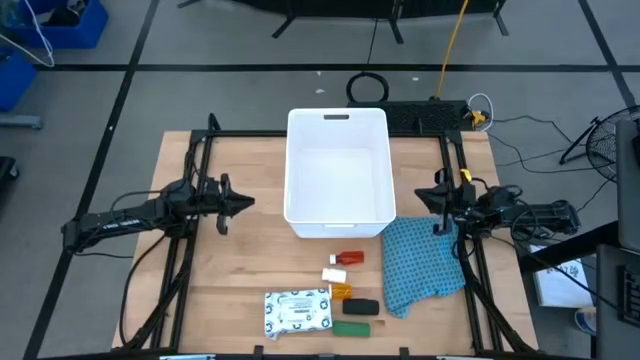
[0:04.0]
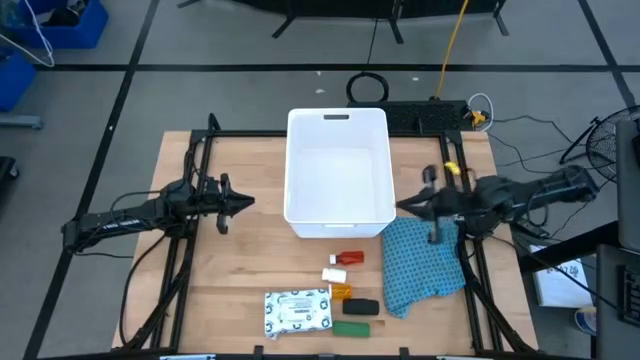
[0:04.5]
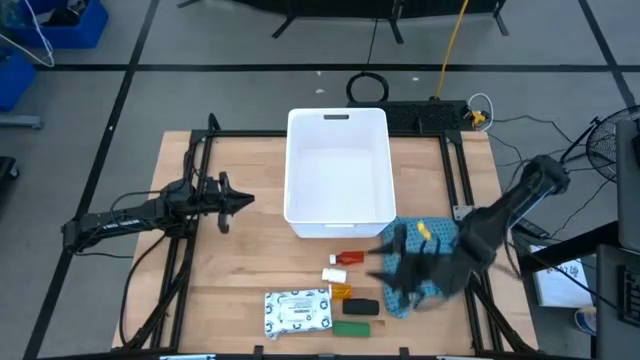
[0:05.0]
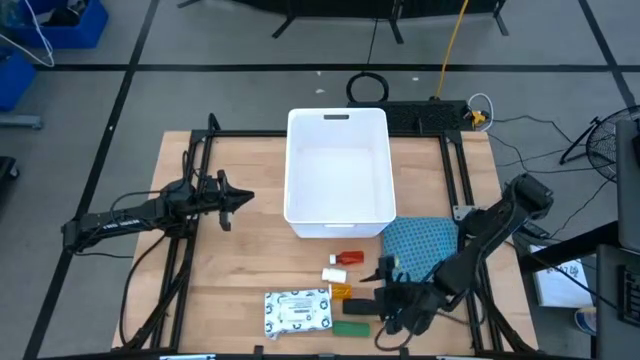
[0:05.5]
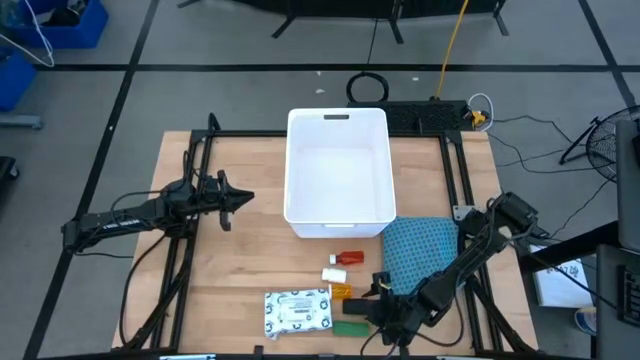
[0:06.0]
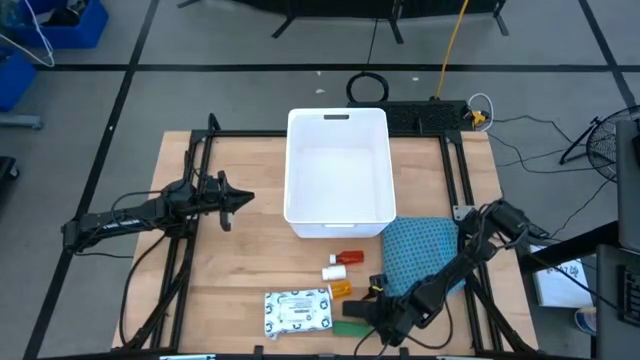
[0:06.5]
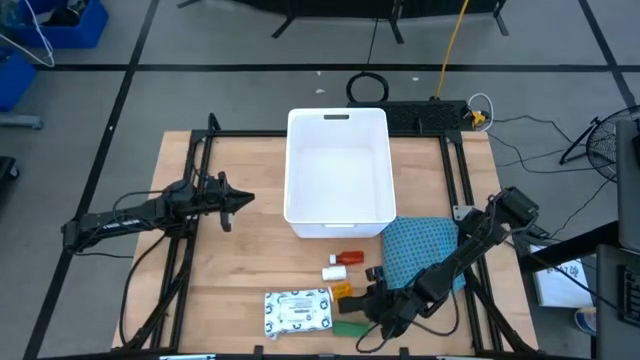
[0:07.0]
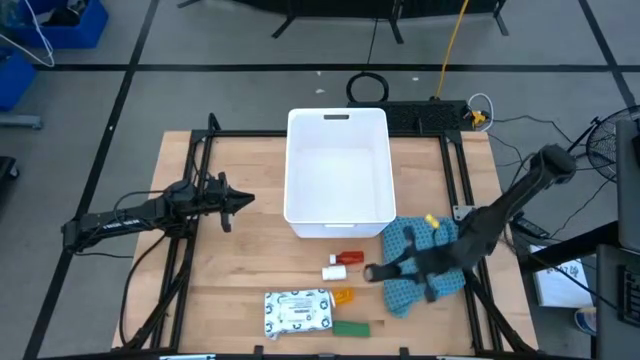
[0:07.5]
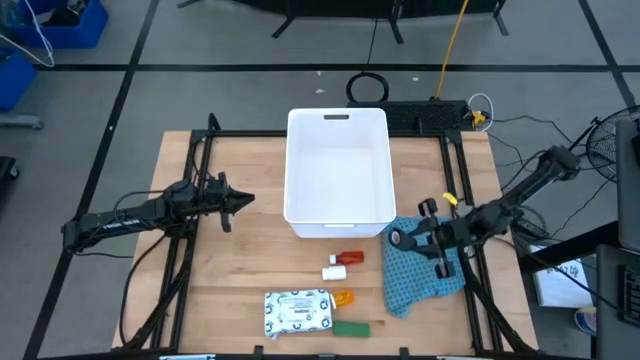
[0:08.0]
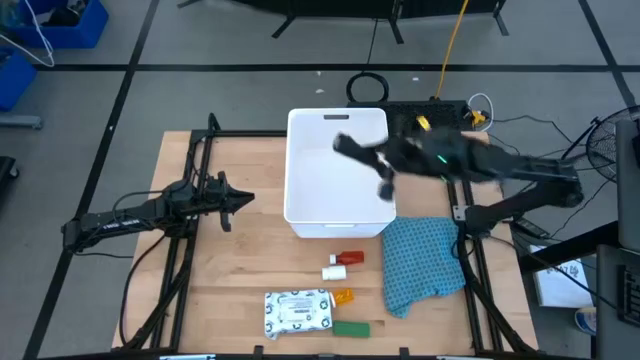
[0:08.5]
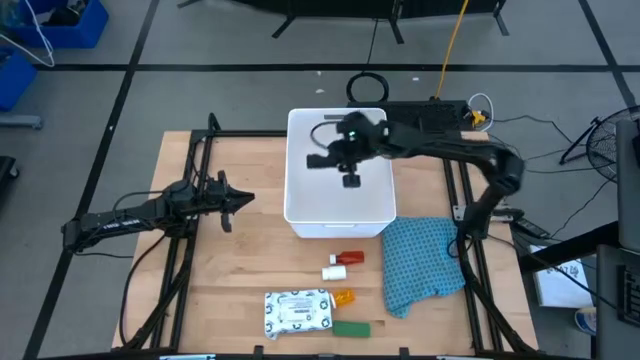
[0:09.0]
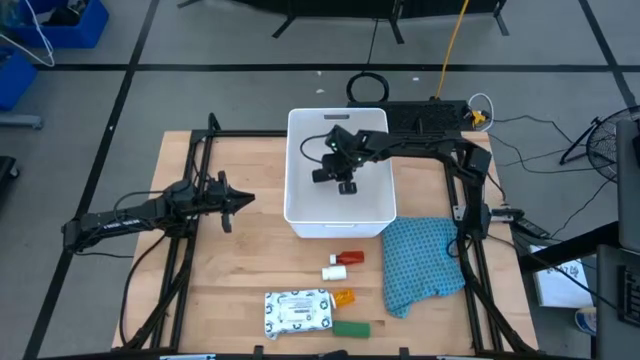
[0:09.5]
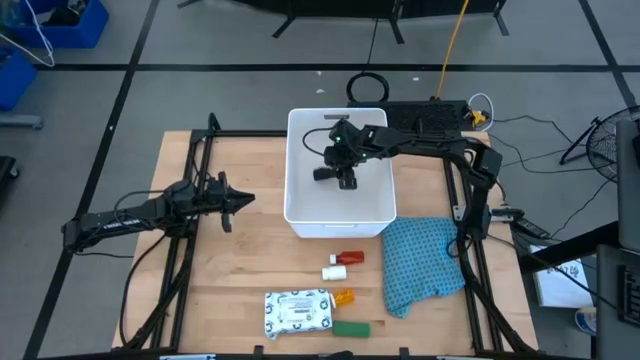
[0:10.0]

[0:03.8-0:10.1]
Task: Pick & place medical supplies in basket/bin
Put the black bandage into the white bin

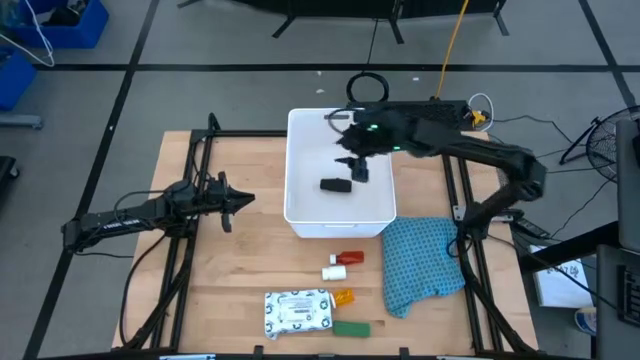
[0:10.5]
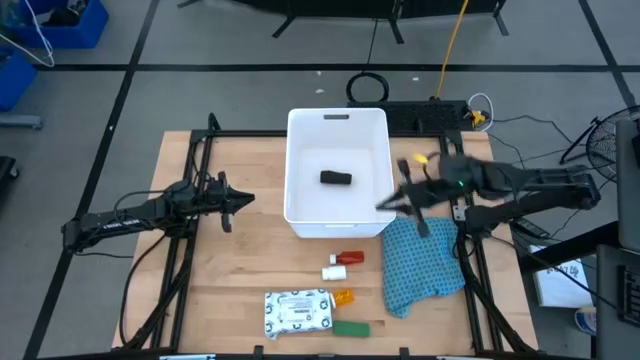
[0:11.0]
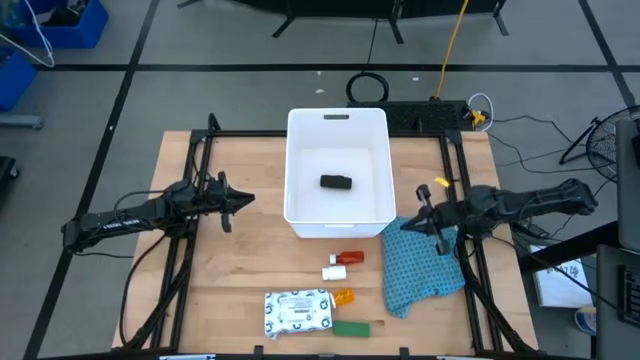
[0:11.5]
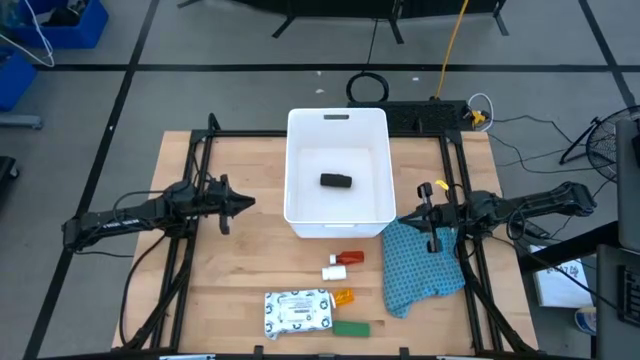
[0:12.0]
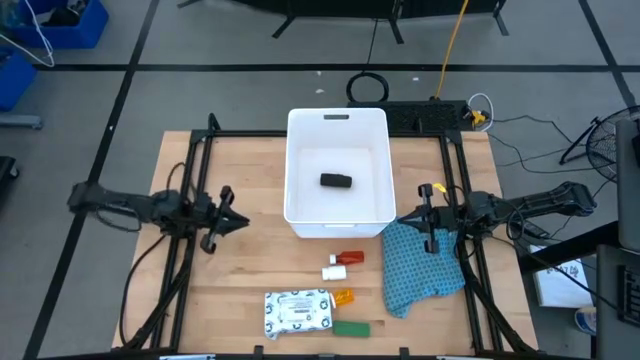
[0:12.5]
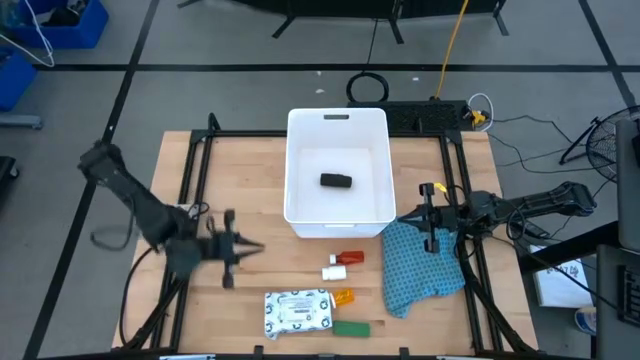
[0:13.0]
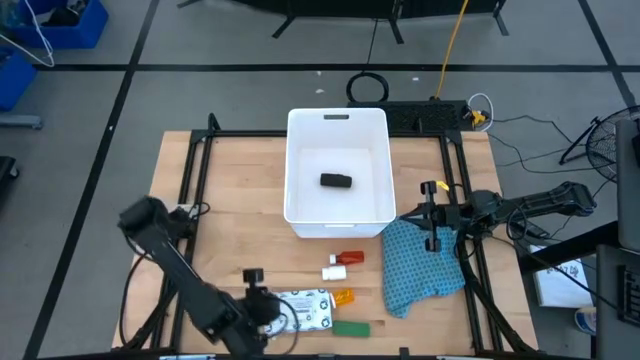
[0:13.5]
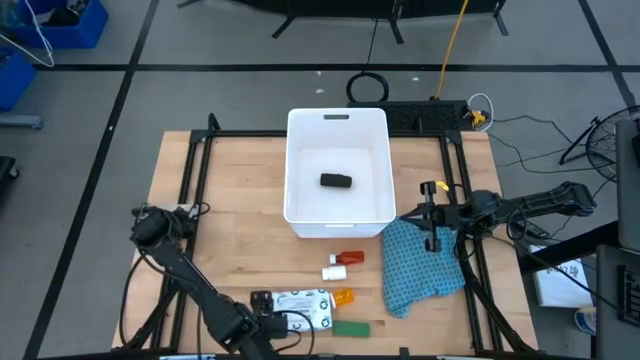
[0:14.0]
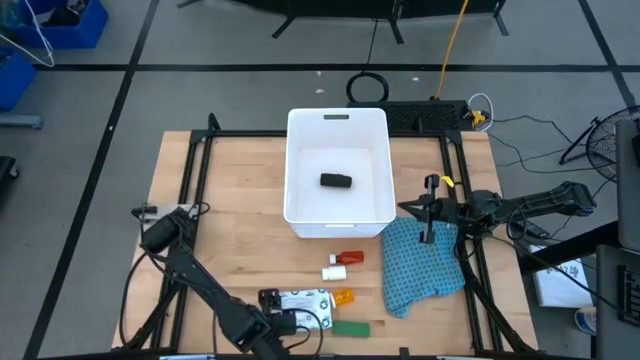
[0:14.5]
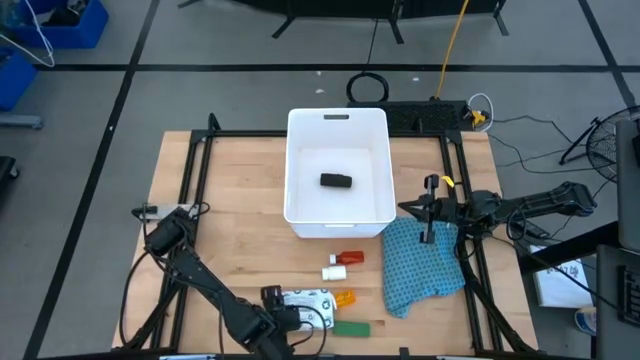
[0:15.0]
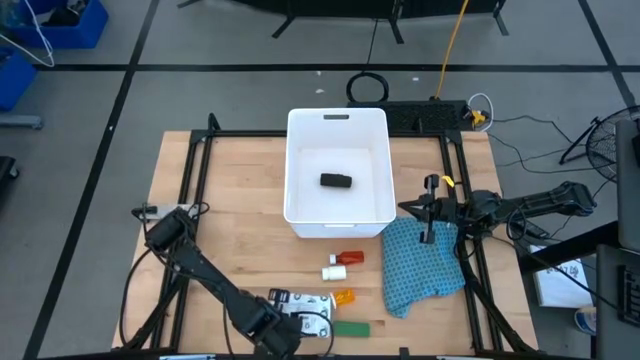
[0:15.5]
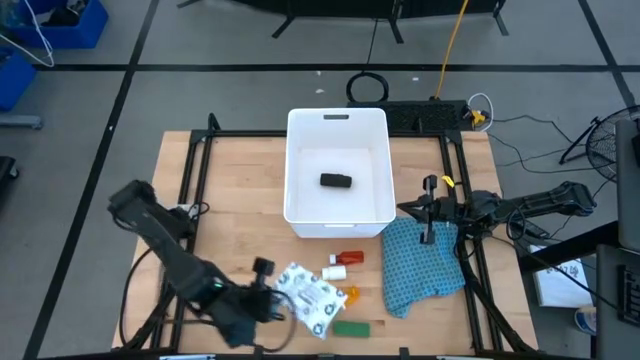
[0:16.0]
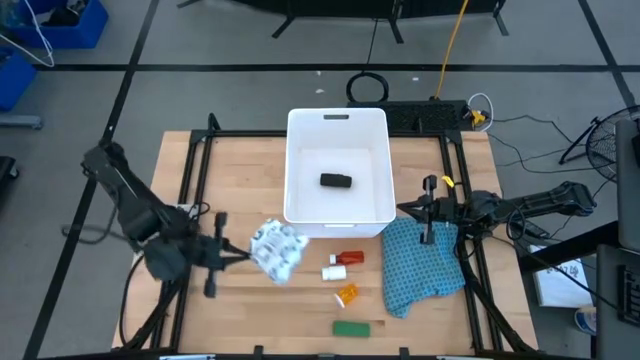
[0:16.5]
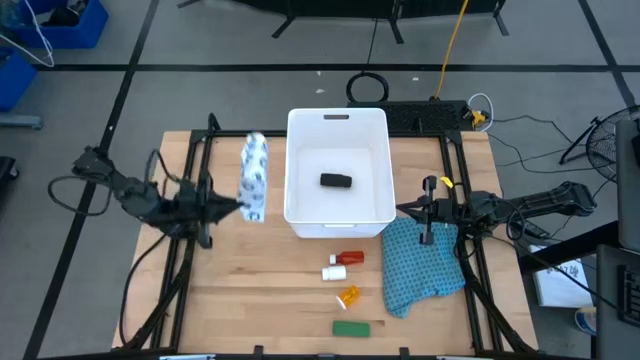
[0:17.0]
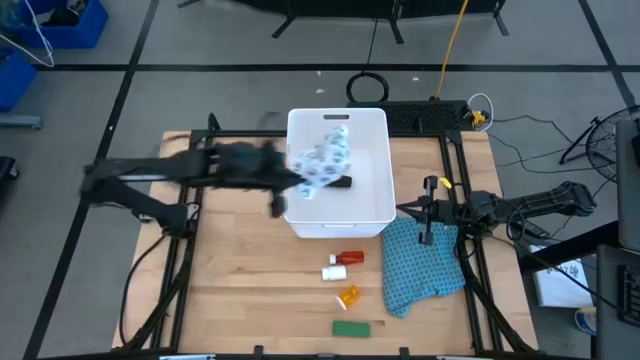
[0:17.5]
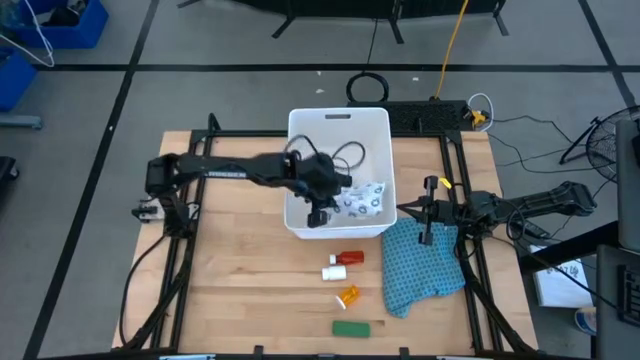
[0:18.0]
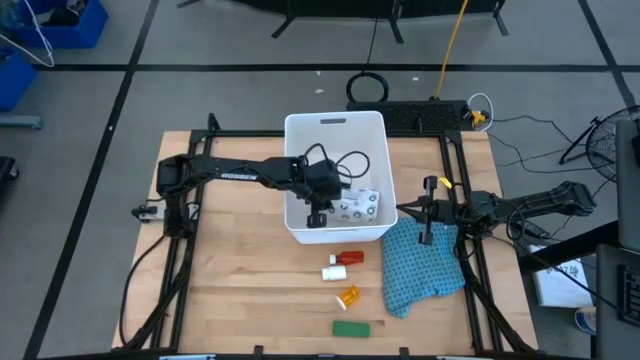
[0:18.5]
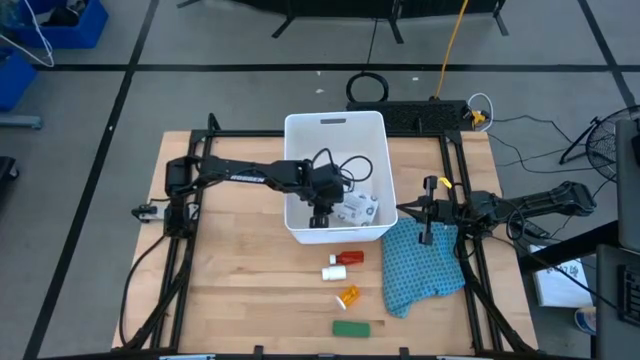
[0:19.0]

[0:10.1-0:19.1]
Put the white wipes into the white bin

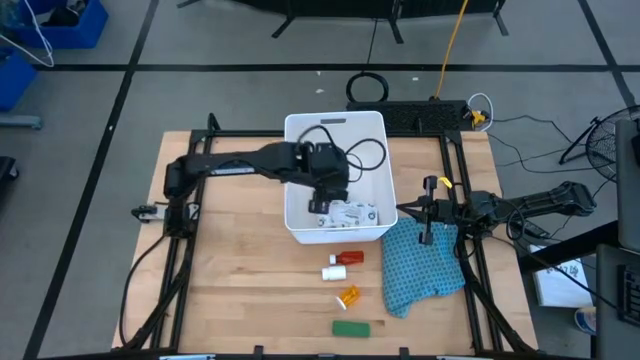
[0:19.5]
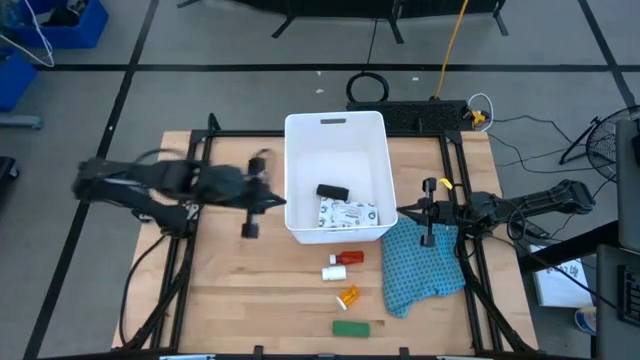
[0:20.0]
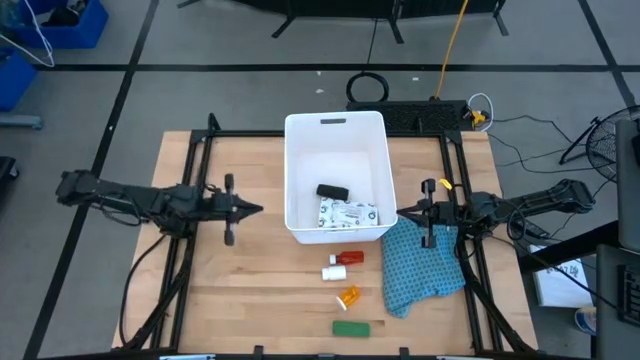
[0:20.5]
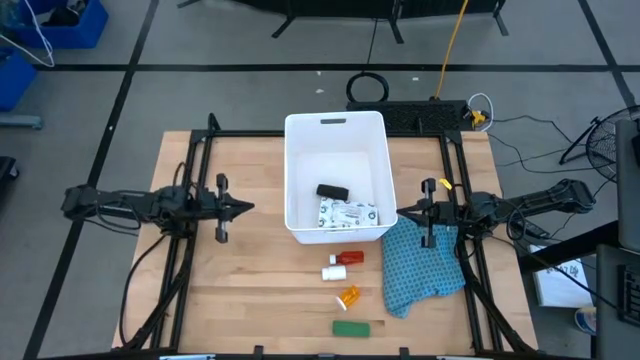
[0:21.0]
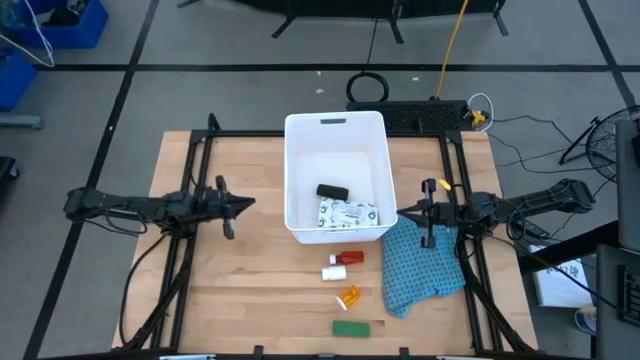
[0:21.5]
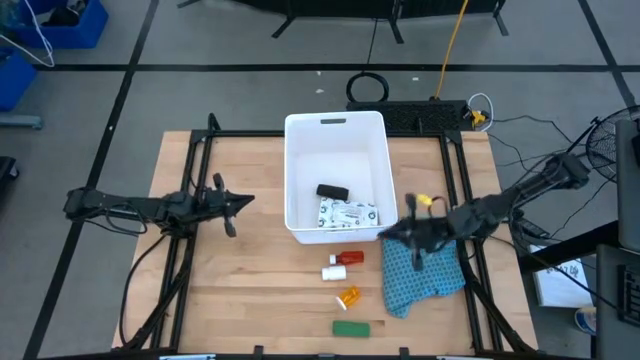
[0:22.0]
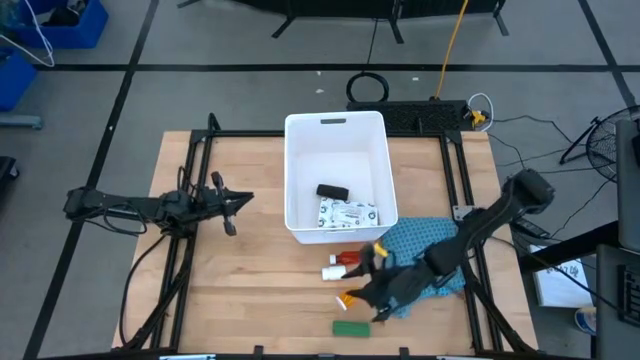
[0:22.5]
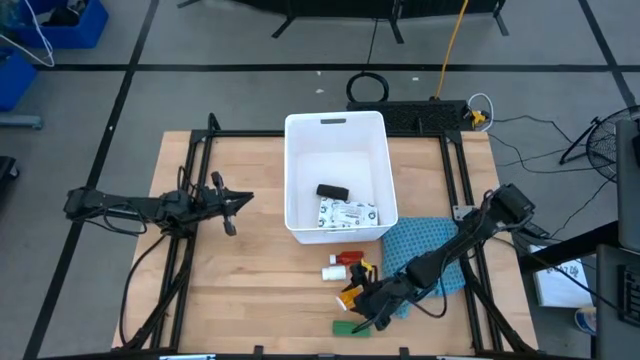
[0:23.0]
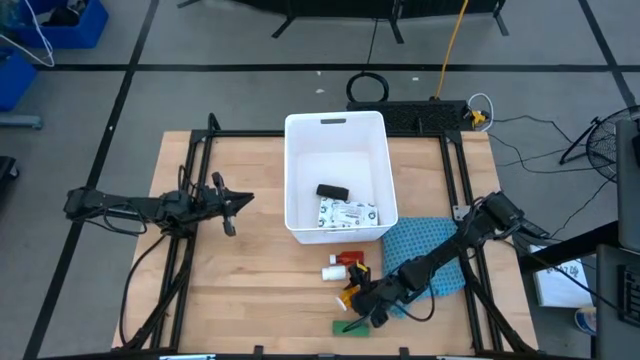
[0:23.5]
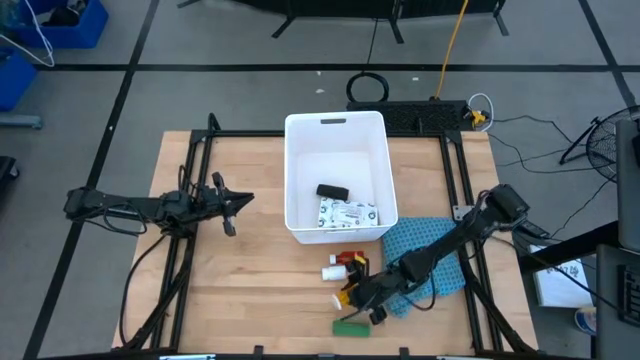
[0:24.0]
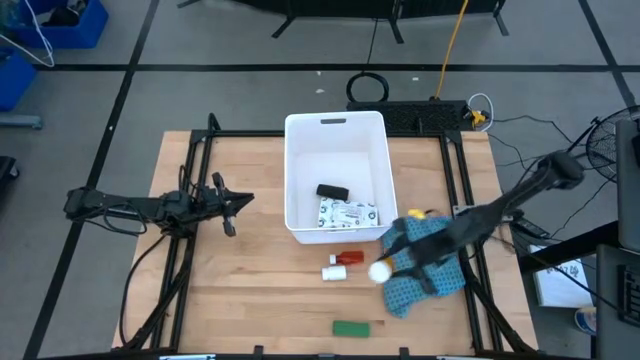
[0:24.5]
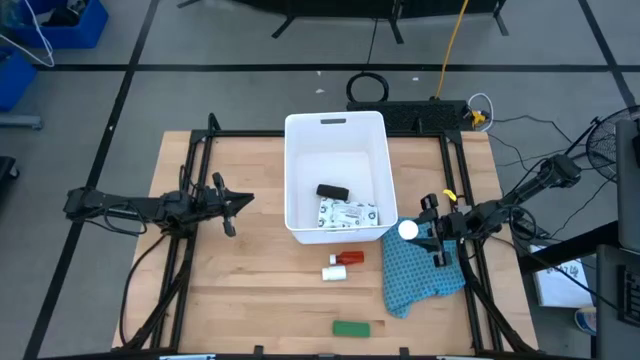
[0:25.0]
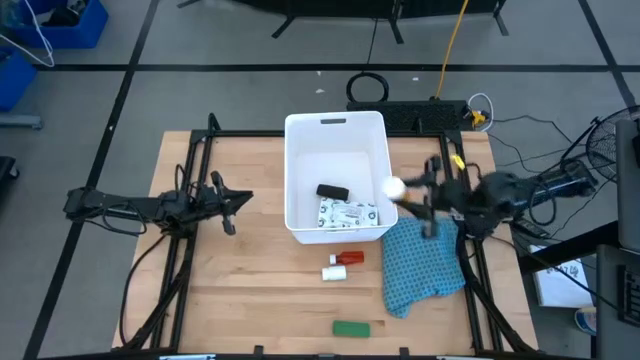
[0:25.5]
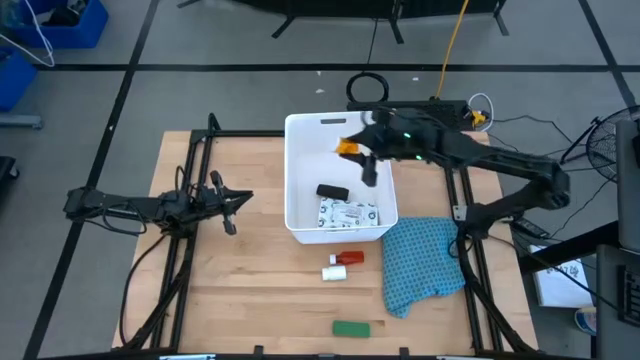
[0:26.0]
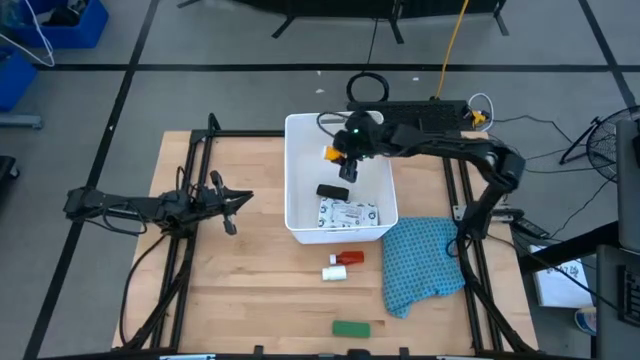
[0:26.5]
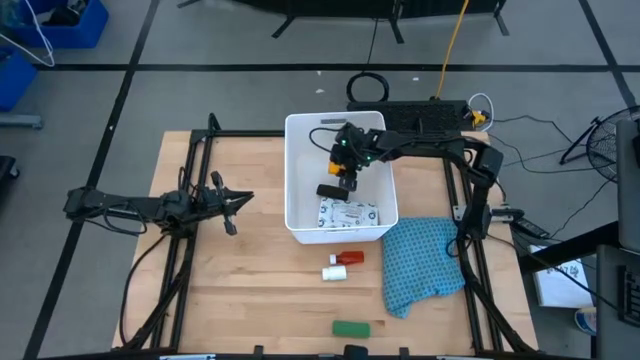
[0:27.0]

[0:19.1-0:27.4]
Put the orange pill bottle into the white bin
